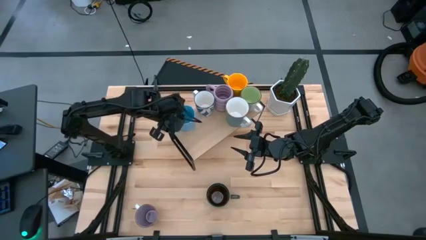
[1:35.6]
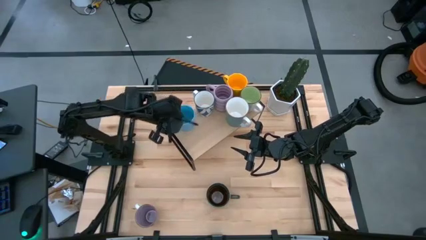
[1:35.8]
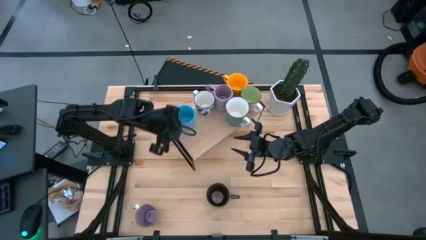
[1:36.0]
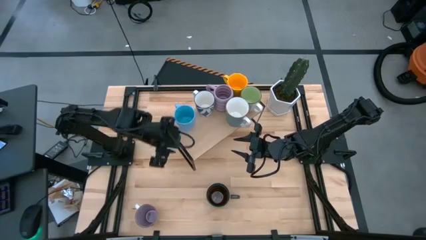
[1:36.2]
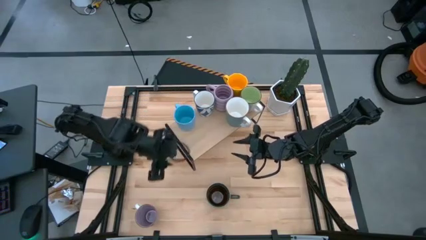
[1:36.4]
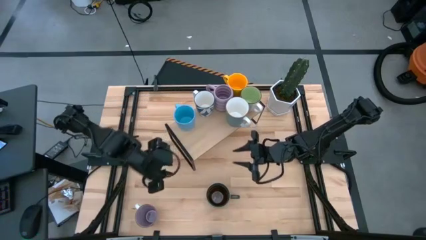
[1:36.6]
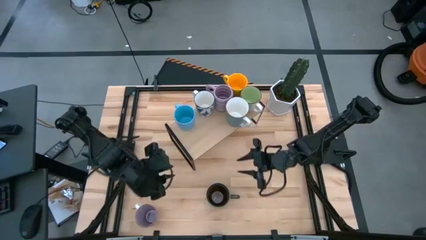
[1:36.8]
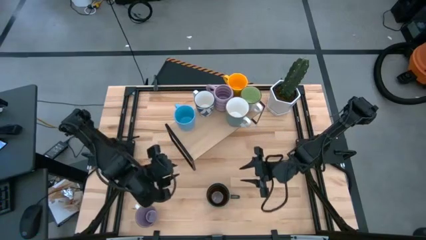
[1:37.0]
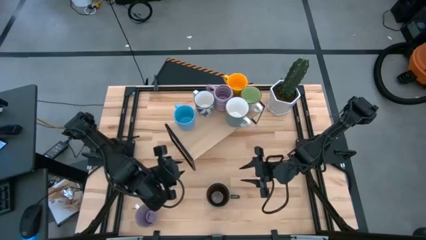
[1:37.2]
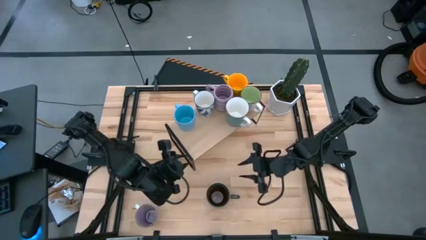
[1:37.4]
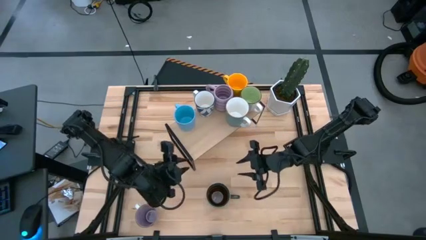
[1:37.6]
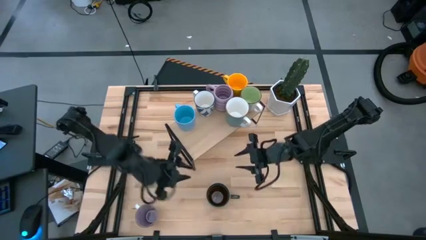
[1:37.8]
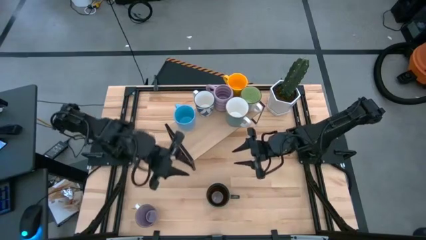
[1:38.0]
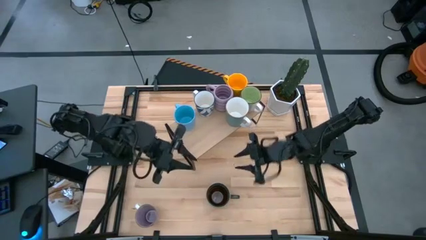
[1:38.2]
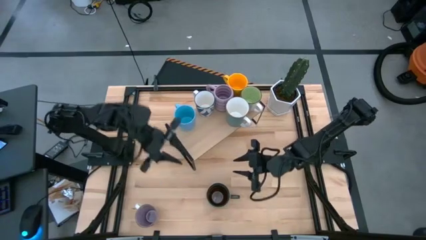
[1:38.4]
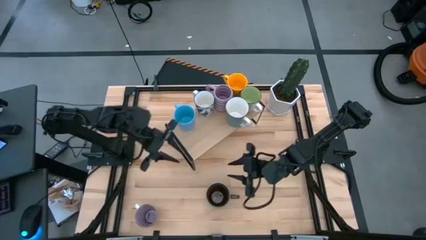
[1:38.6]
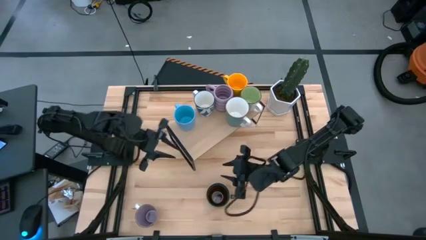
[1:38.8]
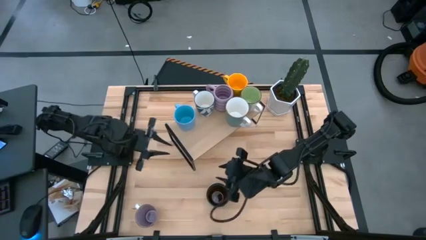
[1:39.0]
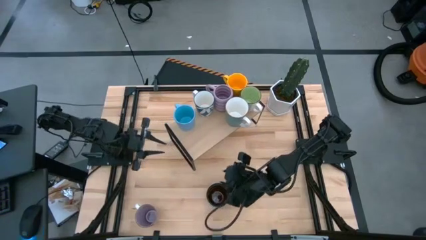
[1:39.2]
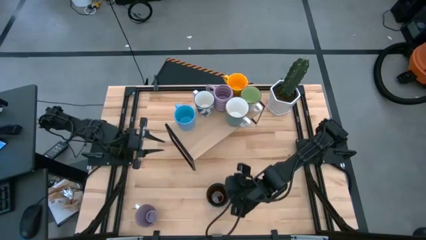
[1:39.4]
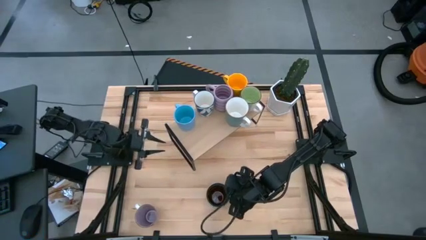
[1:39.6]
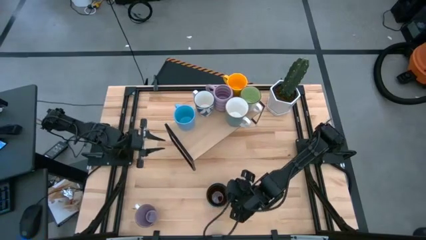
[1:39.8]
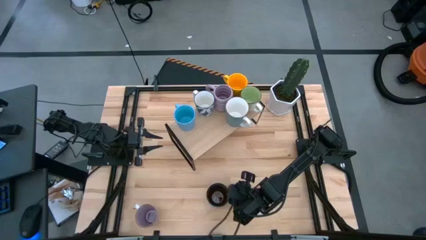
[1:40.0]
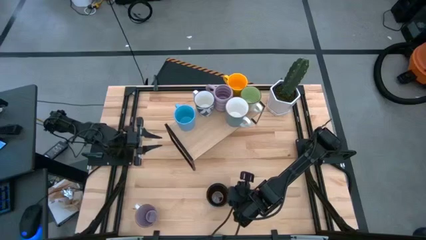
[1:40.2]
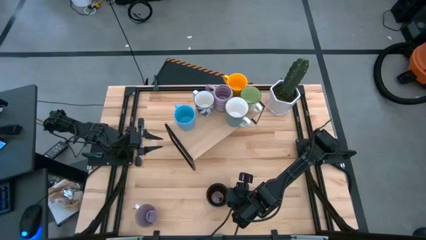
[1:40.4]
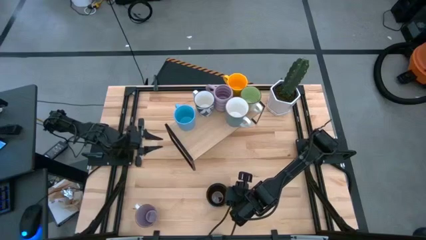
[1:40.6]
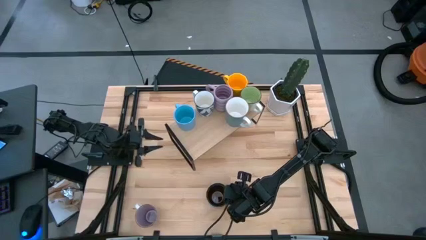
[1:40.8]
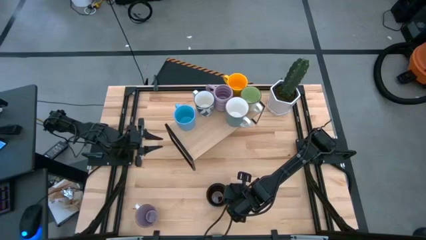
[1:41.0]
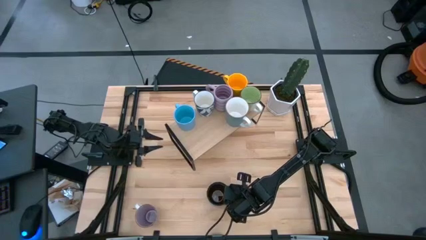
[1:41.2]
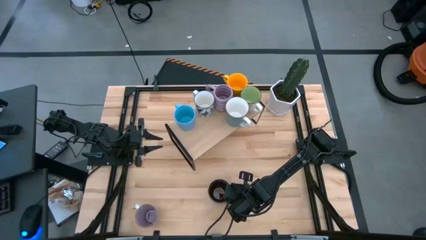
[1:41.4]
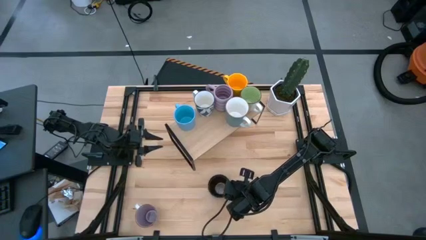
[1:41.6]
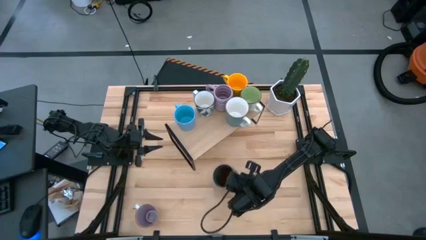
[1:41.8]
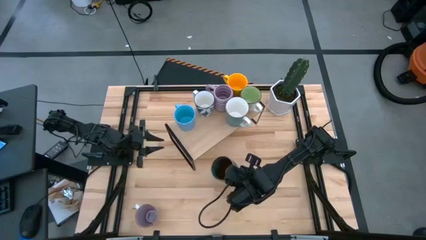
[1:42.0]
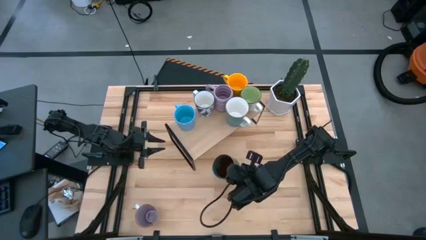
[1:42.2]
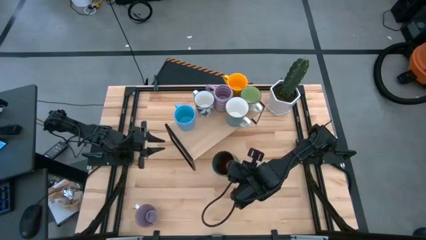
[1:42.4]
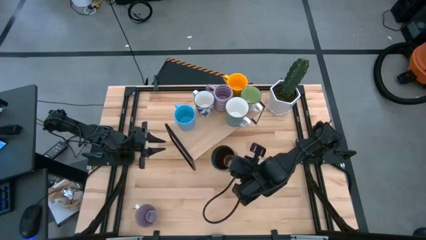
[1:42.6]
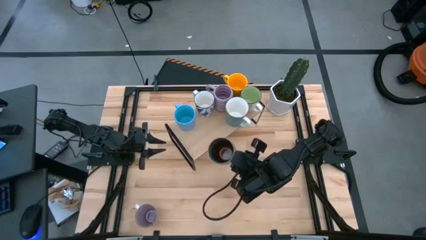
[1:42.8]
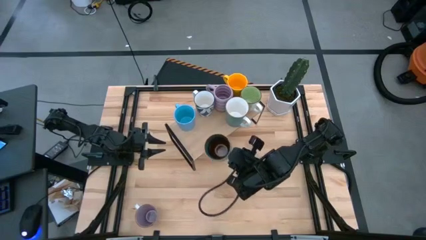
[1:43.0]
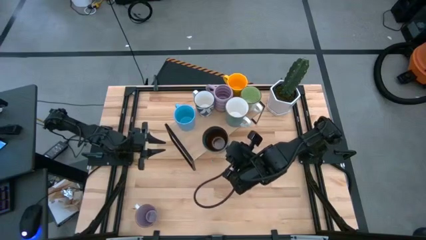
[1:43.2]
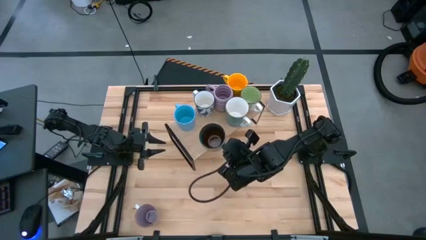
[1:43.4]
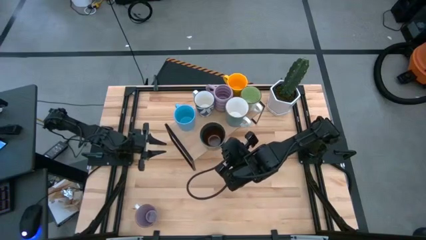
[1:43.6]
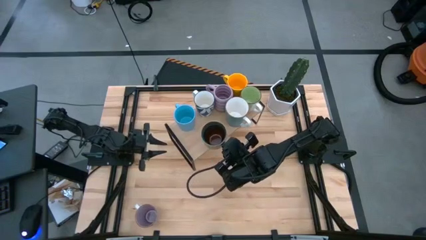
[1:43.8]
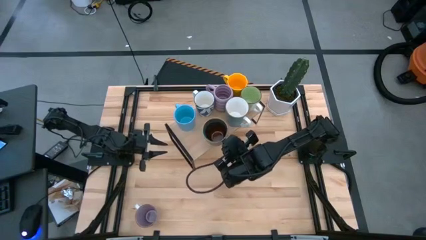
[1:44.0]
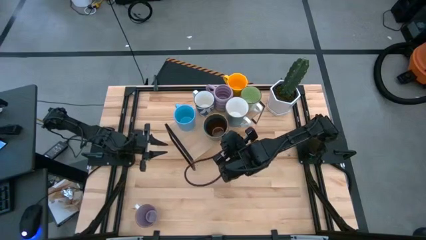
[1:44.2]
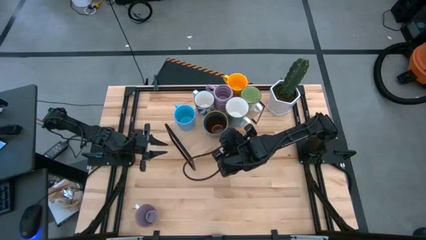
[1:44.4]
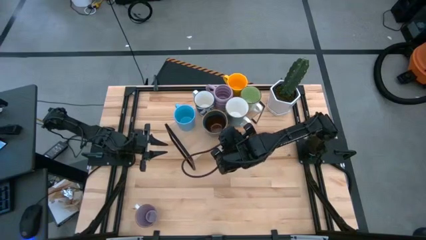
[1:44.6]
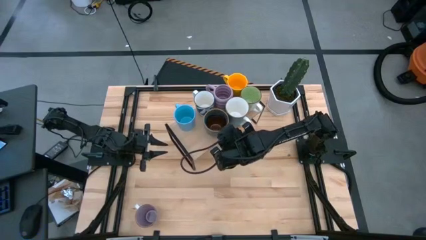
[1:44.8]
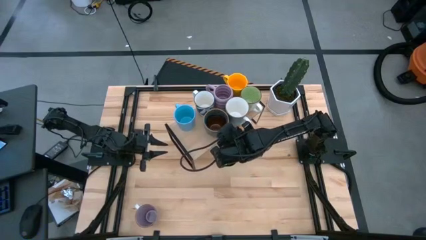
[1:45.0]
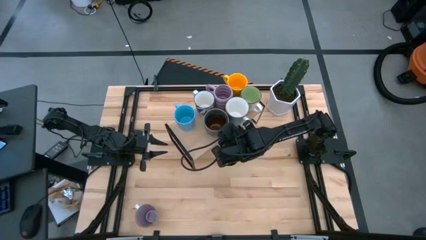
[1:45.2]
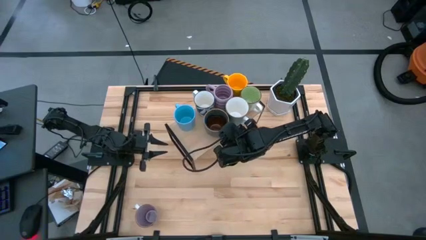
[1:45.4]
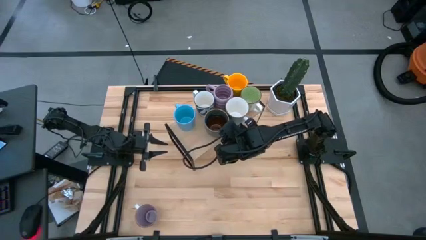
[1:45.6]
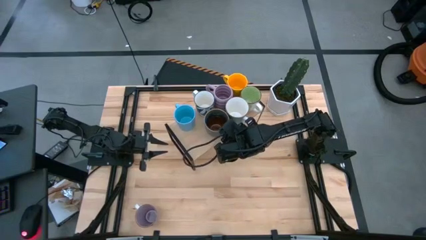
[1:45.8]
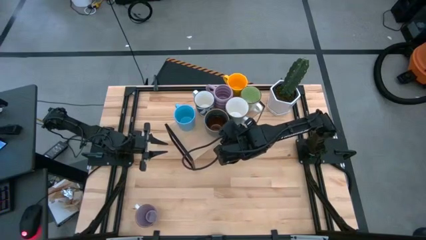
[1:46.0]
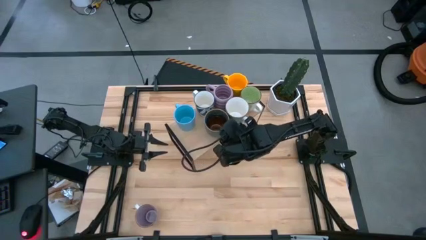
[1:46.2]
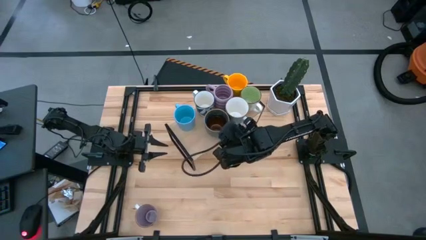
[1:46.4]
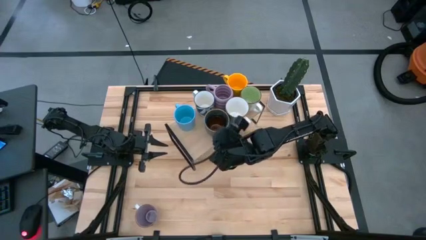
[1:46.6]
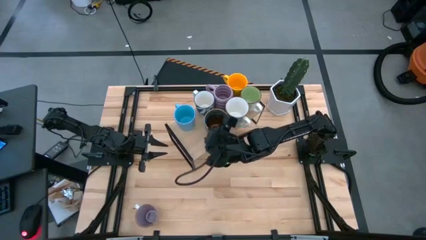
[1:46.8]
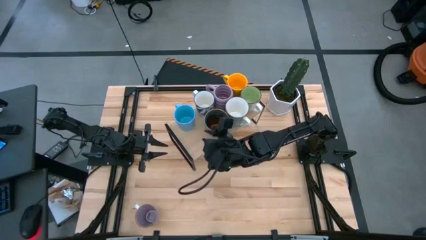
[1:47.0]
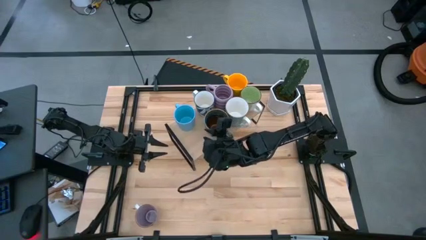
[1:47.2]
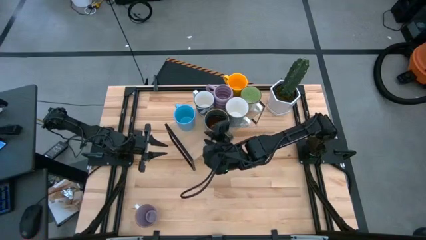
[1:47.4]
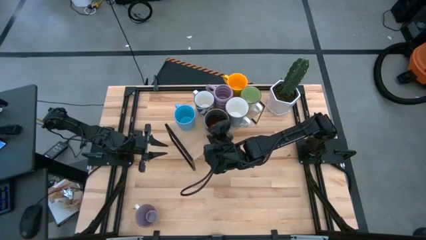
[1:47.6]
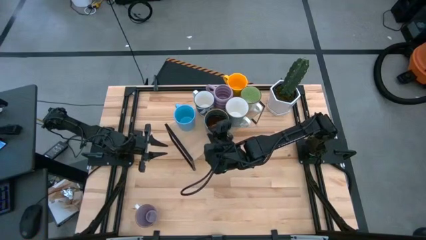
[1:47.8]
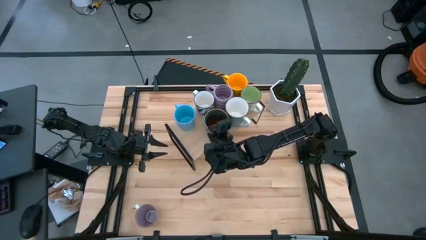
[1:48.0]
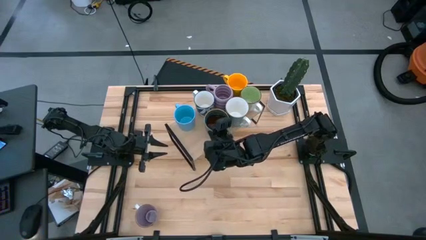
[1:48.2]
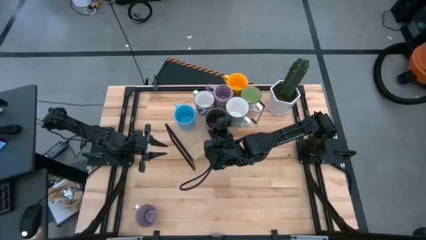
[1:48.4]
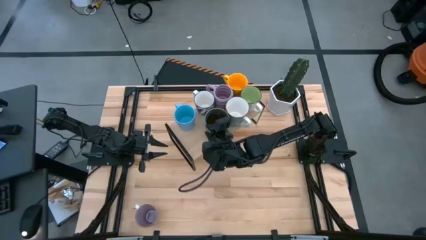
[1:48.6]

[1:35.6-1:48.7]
Task: Place coffee mugs
Put the green patterned mug on the shelf

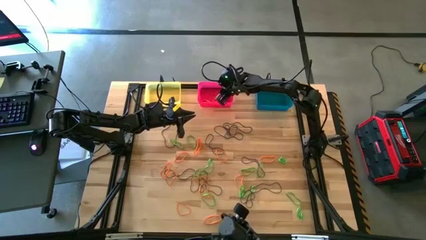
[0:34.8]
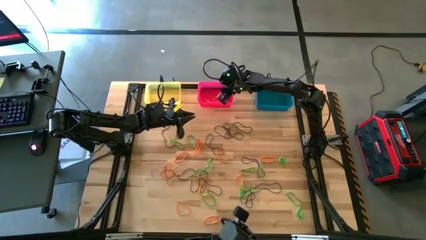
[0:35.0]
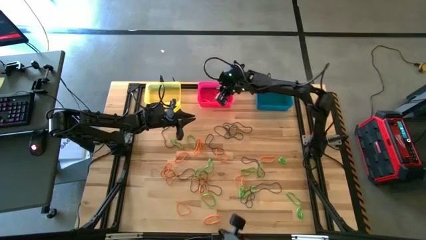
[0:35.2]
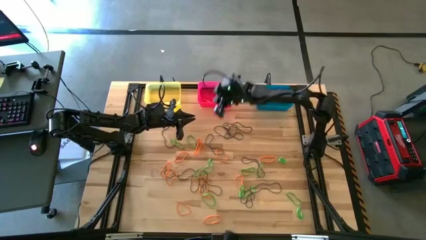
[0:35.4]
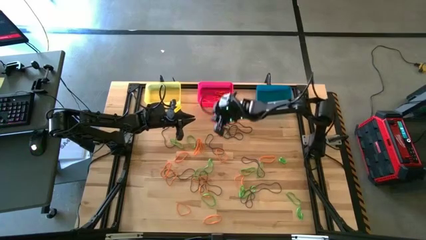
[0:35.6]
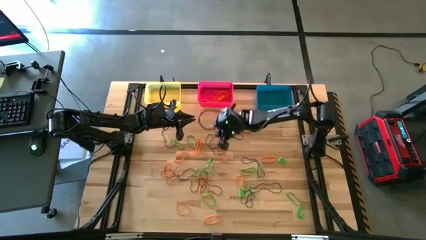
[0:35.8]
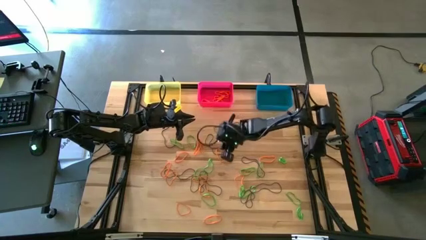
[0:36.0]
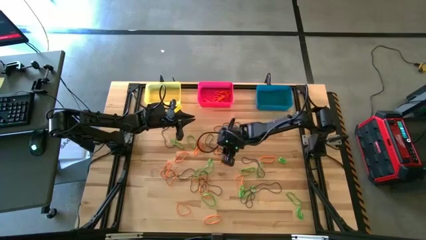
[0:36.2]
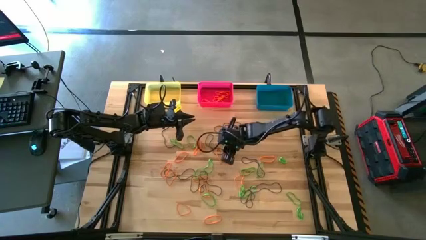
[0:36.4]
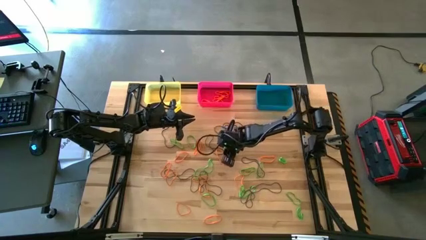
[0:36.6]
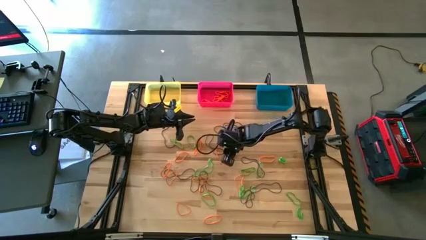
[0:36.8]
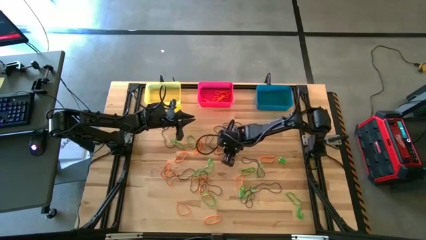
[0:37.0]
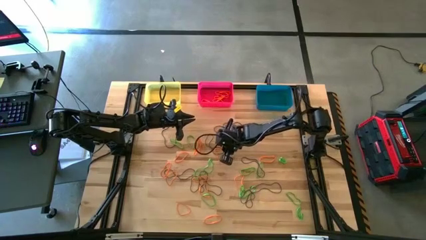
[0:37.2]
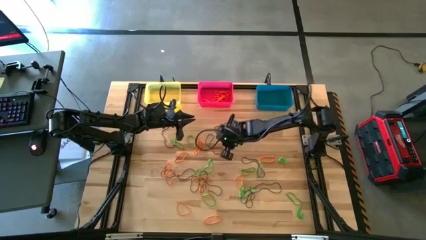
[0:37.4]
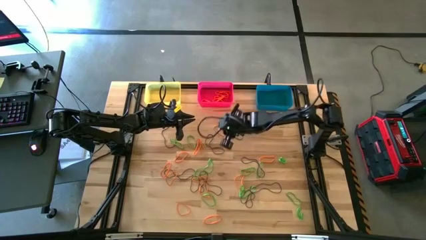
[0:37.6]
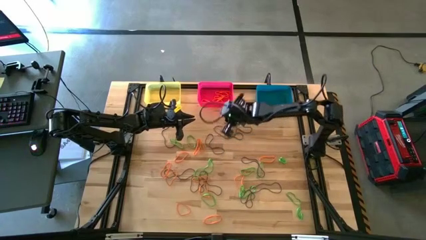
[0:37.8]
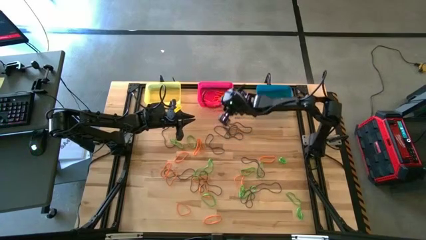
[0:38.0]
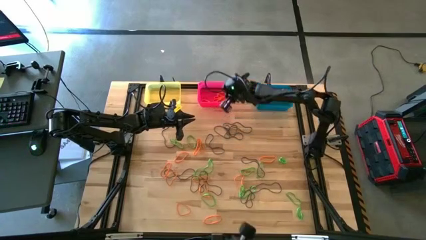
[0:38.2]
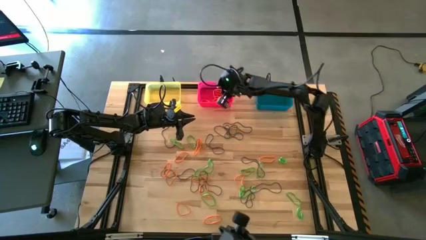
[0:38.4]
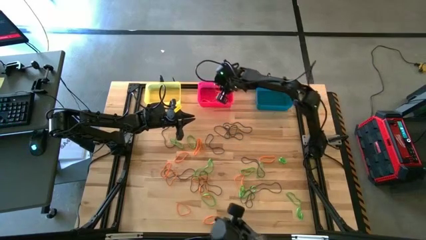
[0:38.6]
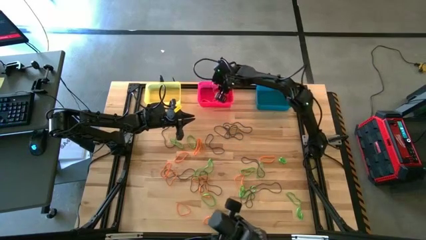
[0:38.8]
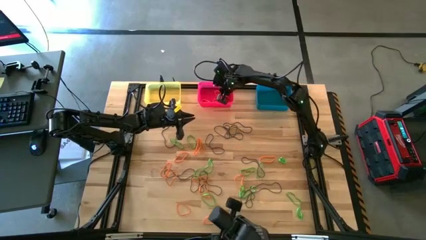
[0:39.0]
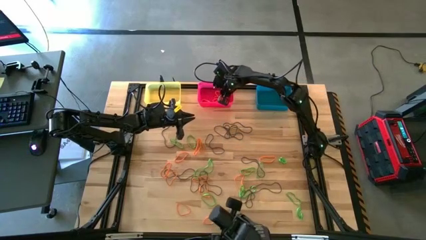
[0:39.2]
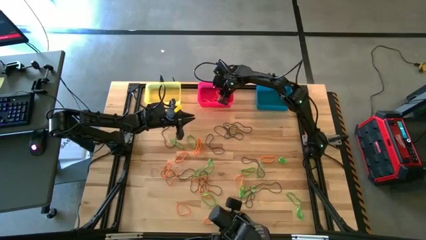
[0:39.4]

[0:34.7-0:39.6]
Task: Sort rubber bands into baskets
Put the orange rubber band into the pink bin
